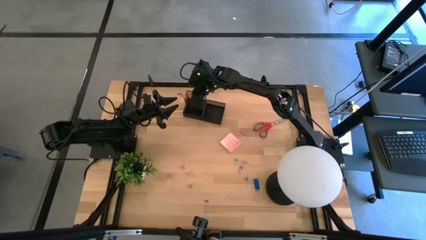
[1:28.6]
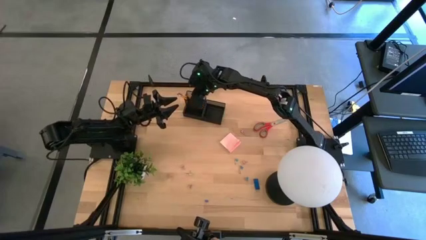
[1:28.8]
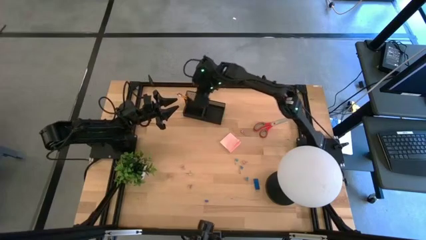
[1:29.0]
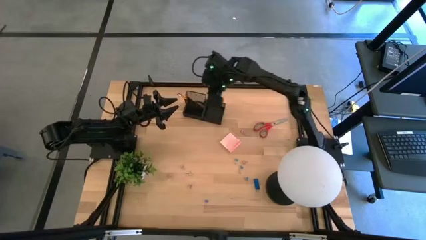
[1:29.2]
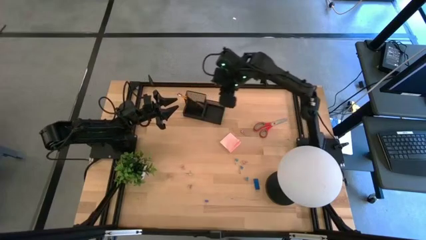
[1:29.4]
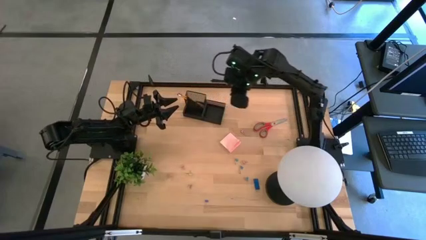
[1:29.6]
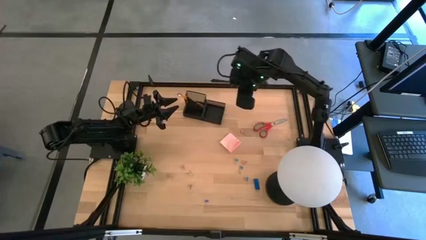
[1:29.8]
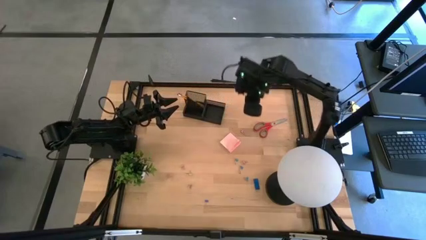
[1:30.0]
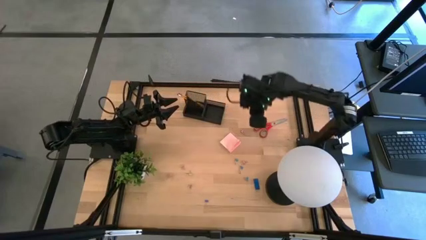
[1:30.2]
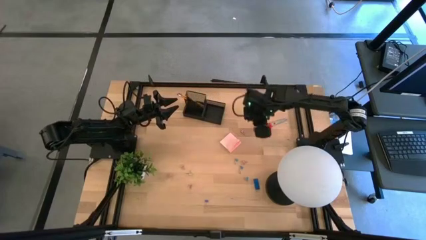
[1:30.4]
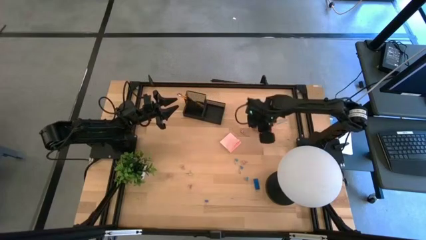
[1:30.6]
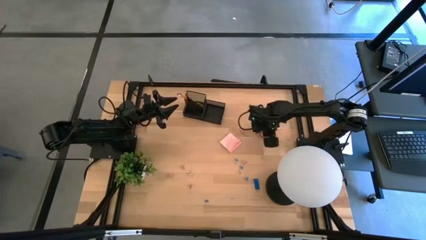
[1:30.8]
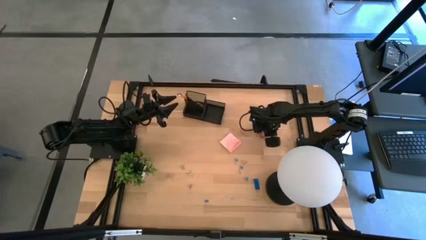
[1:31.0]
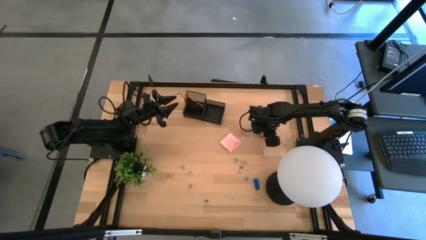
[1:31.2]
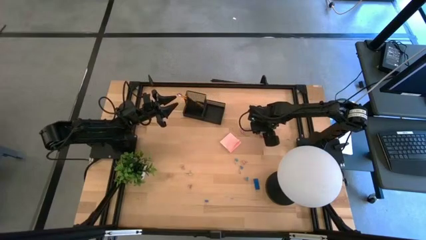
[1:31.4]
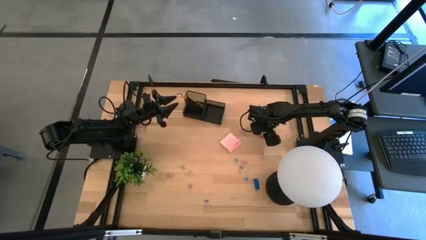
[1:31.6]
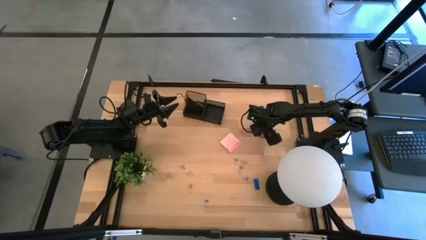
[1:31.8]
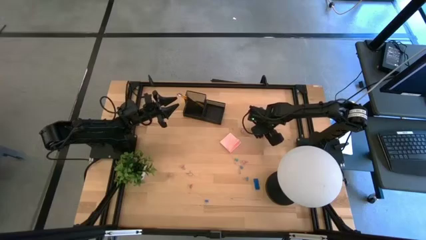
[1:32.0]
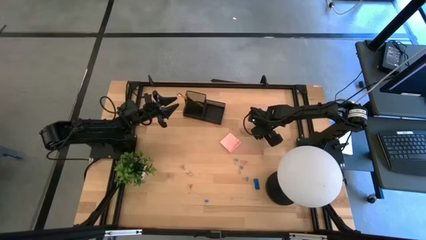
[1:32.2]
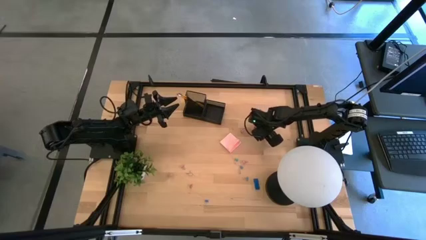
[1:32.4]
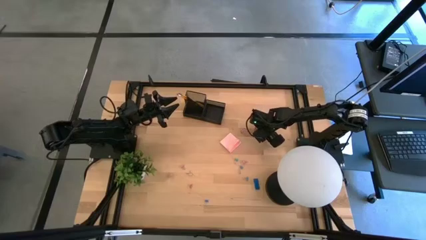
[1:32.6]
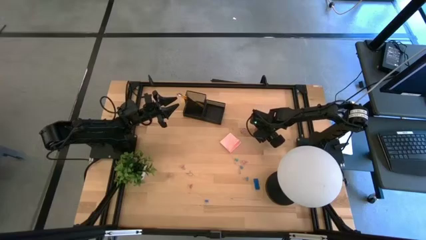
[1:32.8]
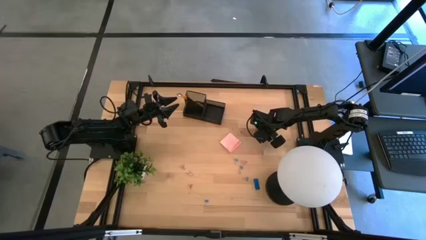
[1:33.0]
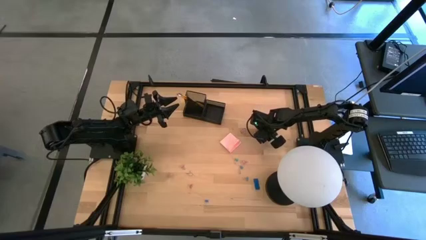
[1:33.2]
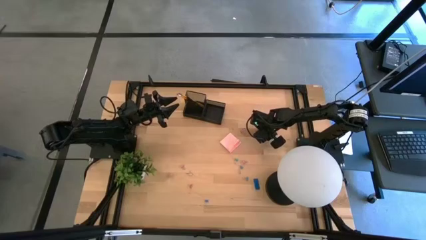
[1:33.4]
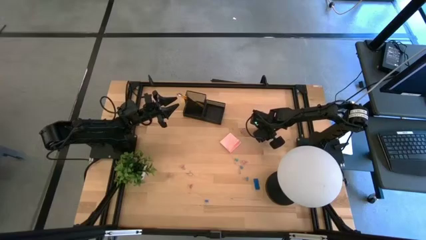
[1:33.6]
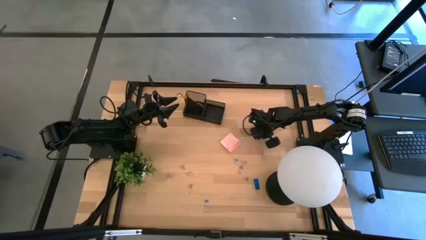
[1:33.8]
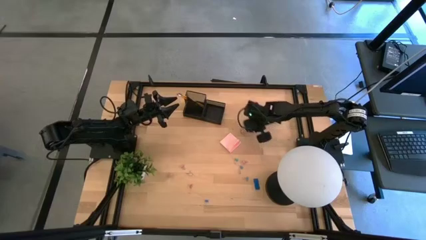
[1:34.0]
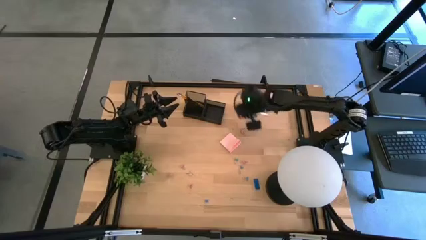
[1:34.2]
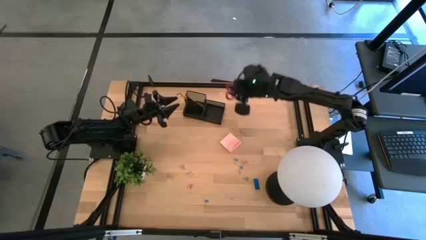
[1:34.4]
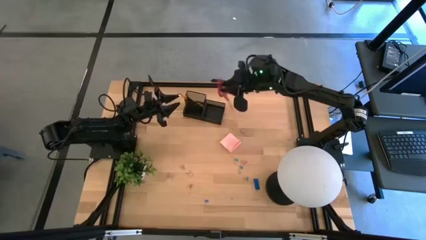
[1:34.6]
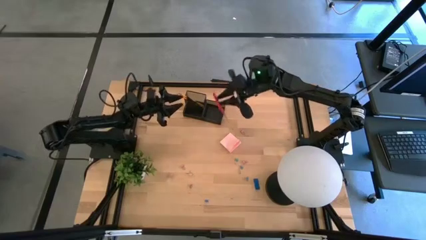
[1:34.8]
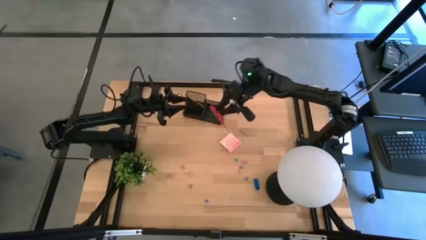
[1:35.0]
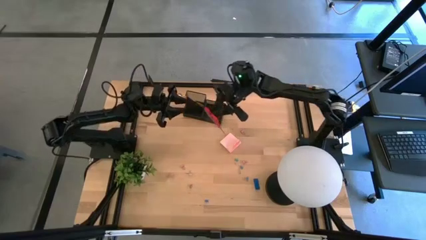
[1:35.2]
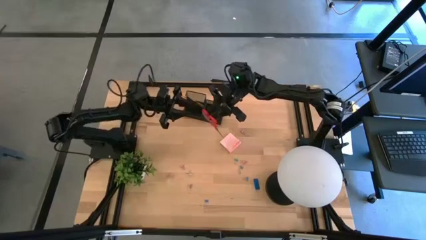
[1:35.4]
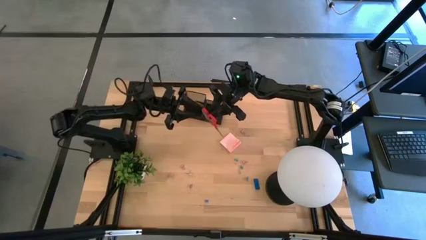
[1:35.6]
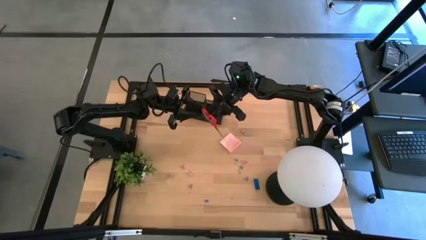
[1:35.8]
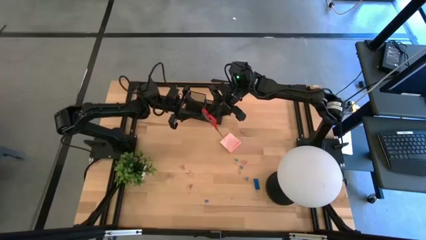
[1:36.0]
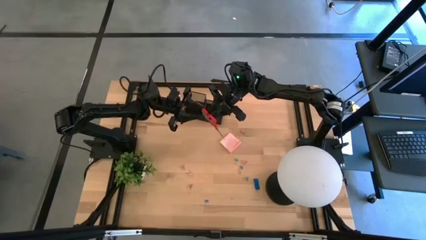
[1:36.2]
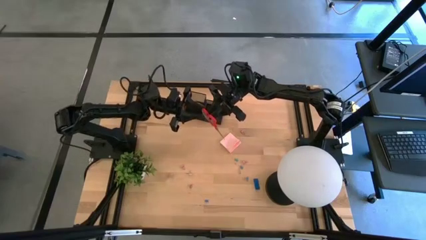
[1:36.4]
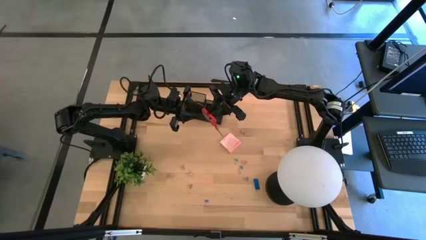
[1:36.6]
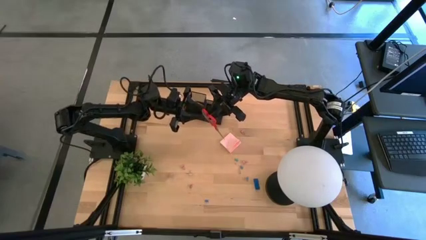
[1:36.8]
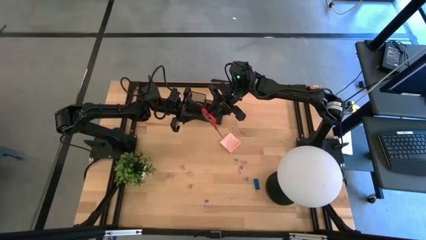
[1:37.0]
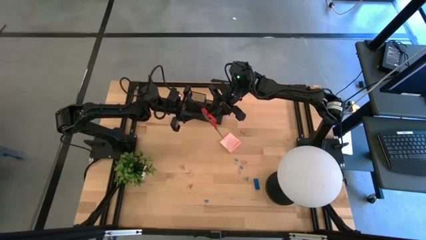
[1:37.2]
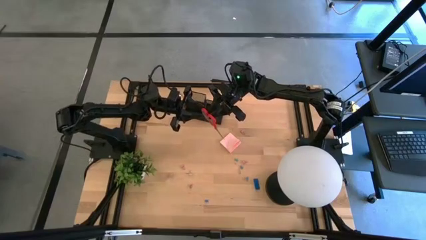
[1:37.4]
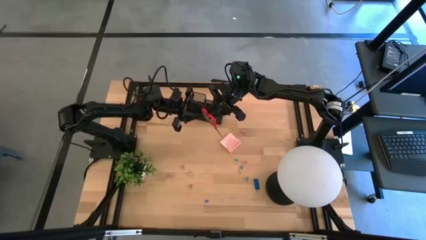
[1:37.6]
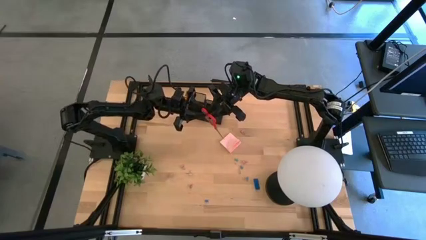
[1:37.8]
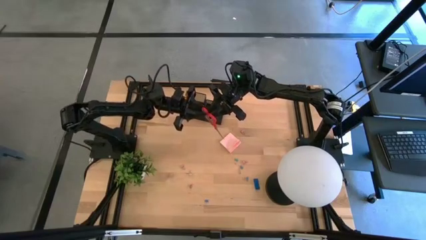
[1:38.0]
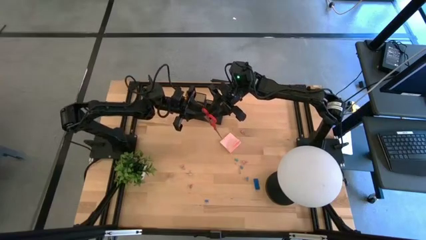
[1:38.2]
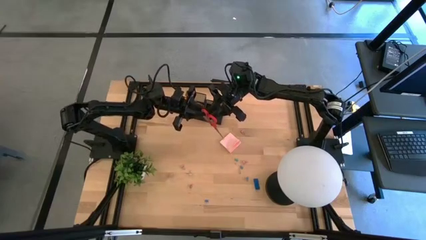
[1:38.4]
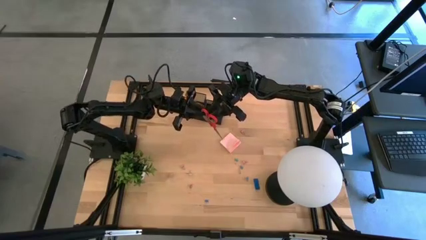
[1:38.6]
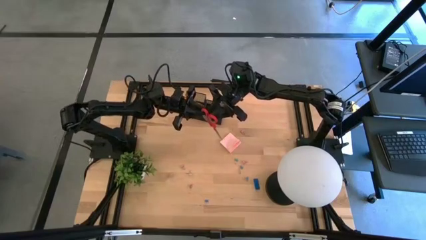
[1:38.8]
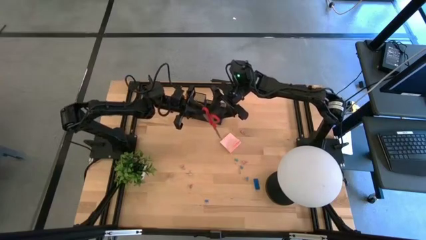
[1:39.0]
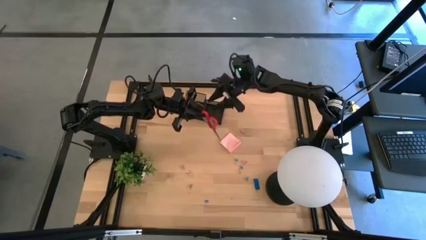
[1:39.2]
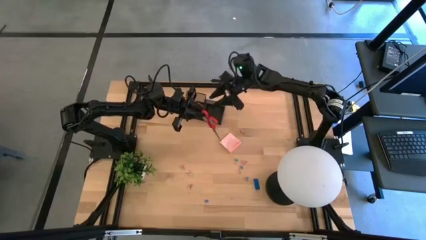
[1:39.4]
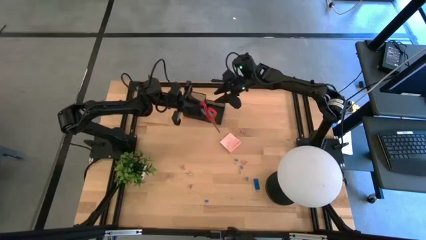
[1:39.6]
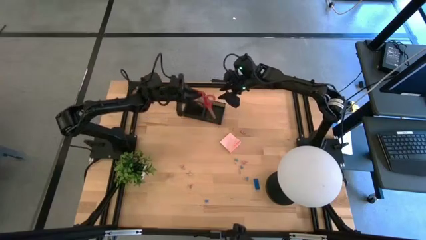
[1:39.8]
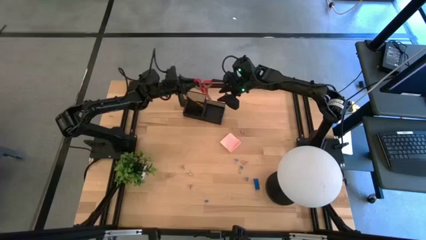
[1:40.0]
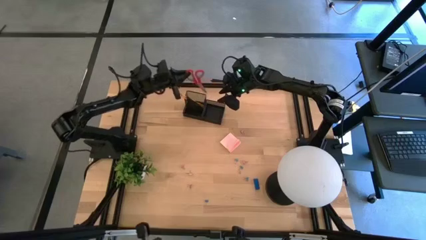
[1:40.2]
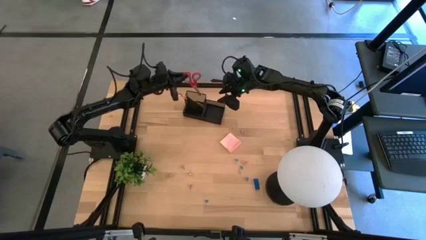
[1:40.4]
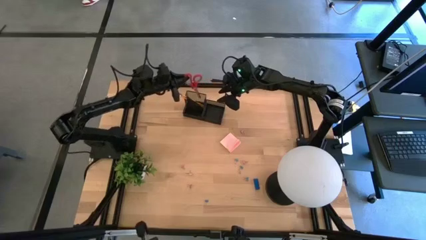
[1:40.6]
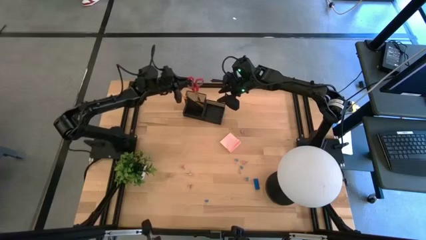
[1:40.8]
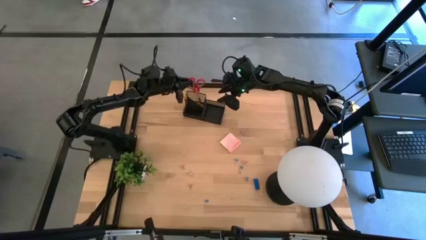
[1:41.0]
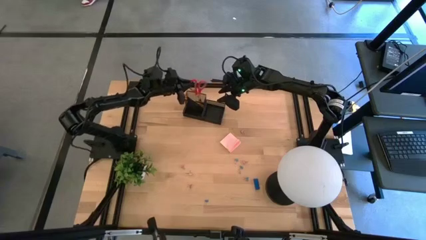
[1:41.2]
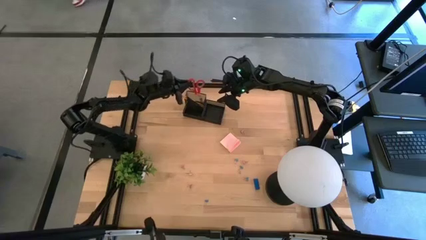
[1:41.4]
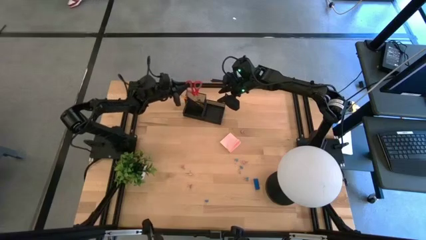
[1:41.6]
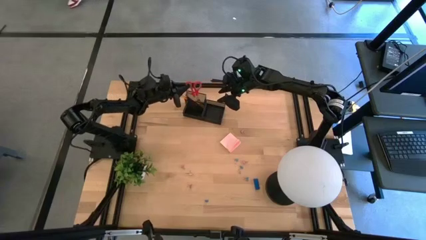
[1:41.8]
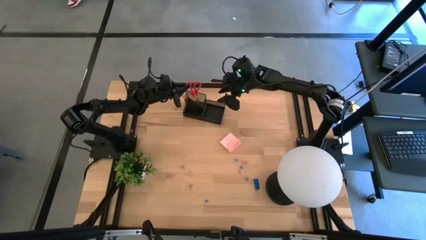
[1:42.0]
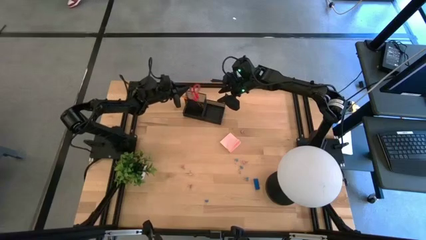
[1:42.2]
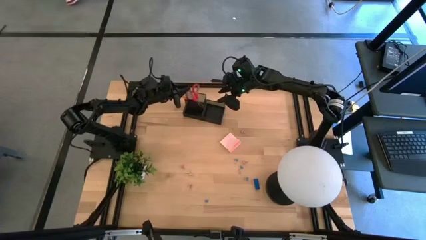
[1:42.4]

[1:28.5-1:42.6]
Task: Pick and place office supplies into organizer
Put the red scissors into the black desk organizer

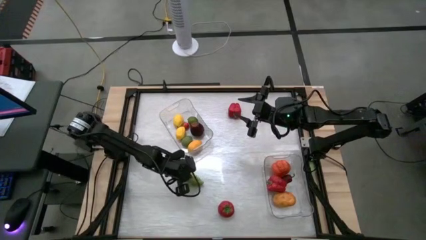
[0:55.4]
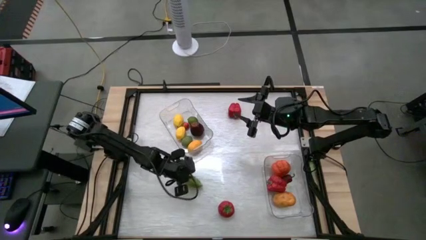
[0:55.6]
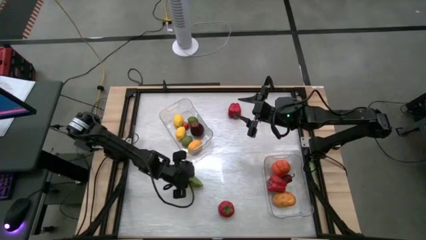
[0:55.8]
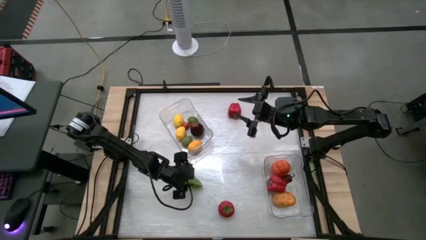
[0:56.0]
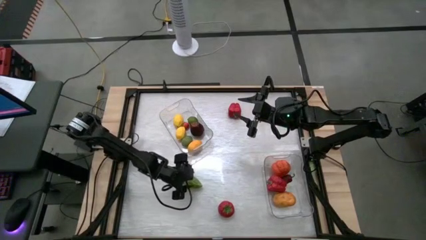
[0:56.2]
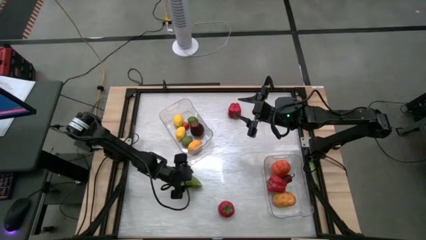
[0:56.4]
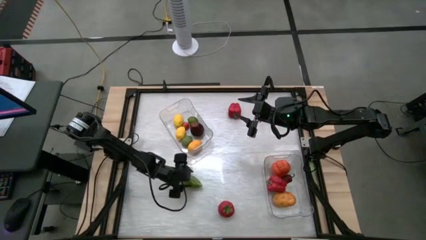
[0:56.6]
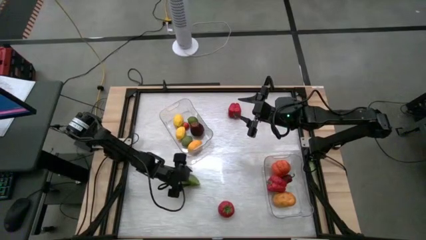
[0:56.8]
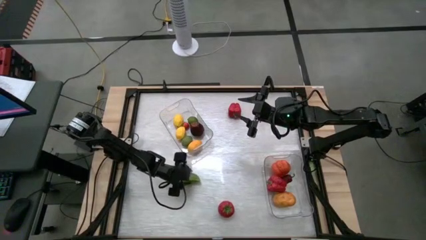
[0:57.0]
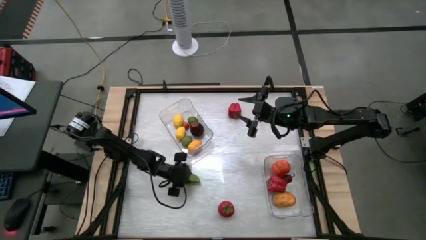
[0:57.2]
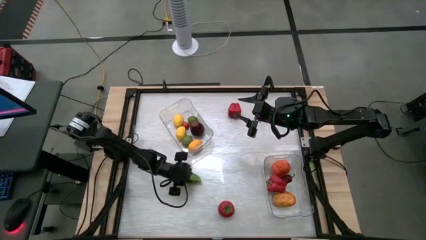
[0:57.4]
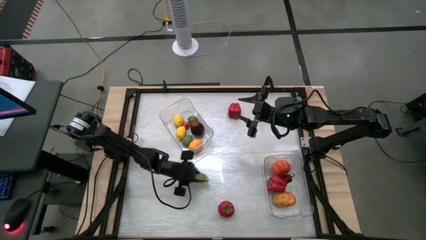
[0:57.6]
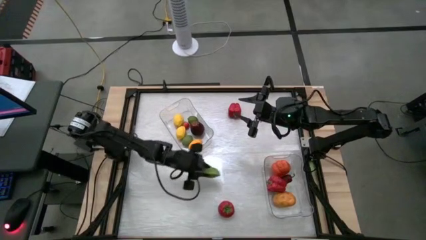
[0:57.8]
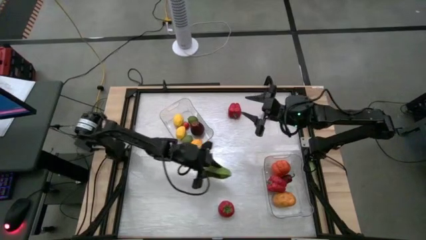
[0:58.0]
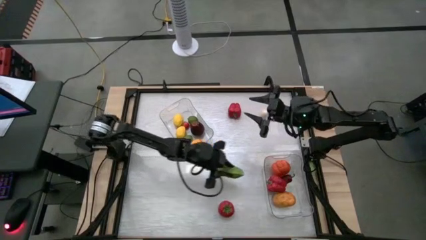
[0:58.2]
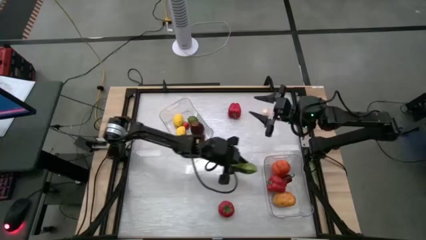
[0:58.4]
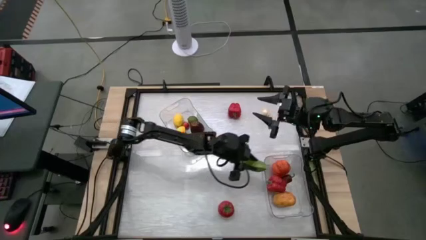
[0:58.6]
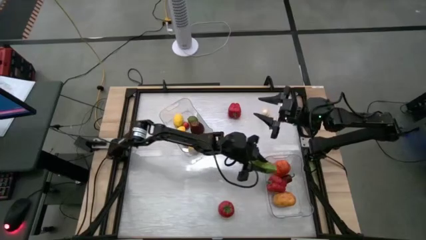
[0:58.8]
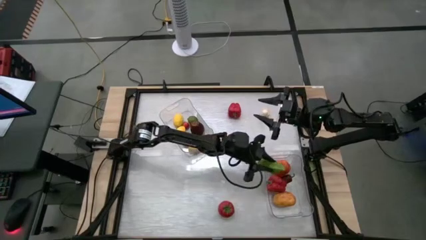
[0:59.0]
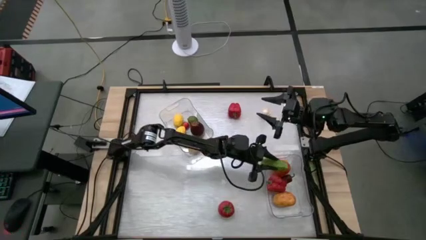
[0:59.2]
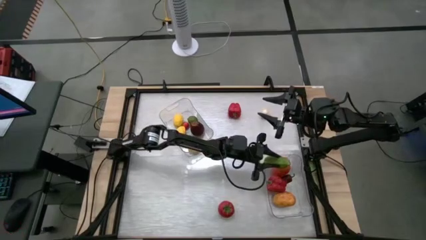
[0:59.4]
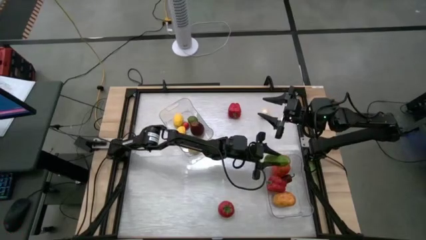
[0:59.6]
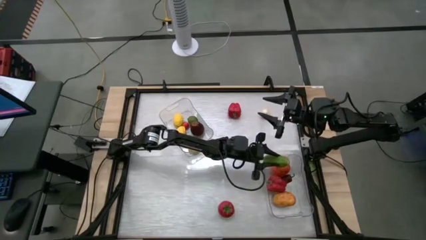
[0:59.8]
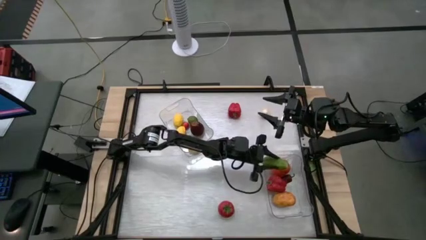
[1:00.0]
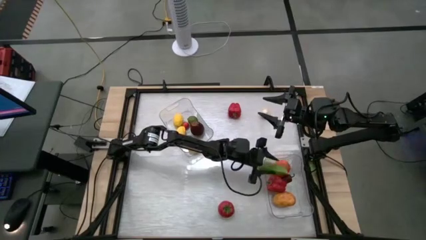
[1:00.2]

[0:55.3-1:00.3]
Task: Sort produce into baskets
Put the green cucumber into the bottom transparent bin
